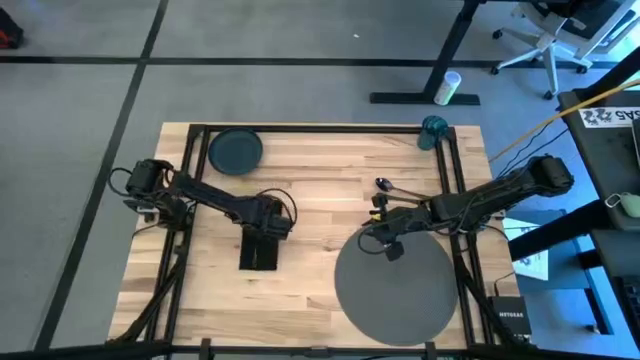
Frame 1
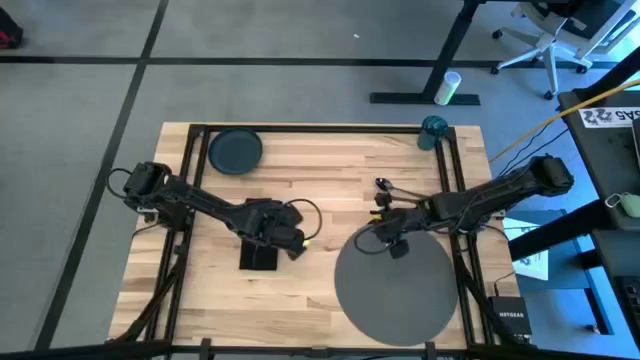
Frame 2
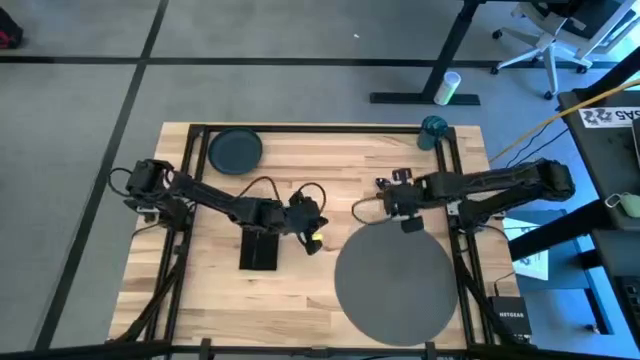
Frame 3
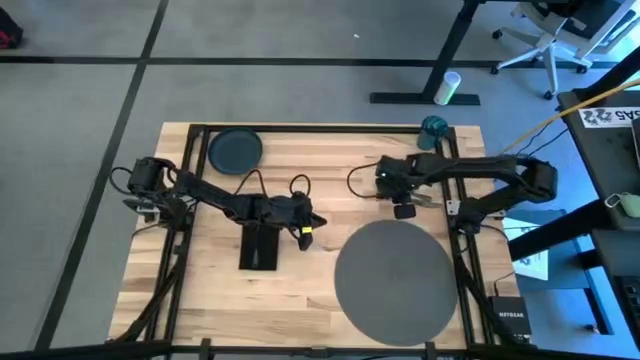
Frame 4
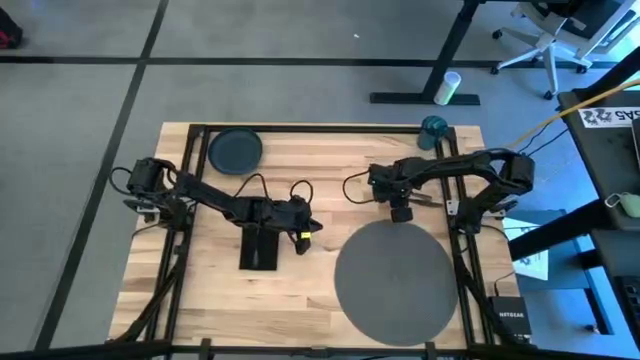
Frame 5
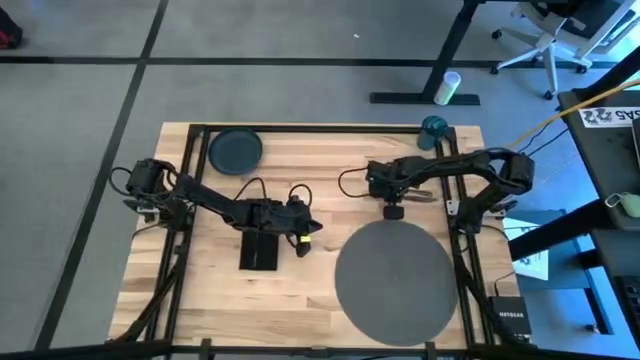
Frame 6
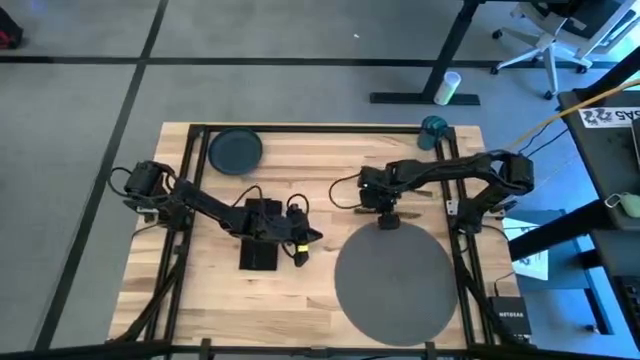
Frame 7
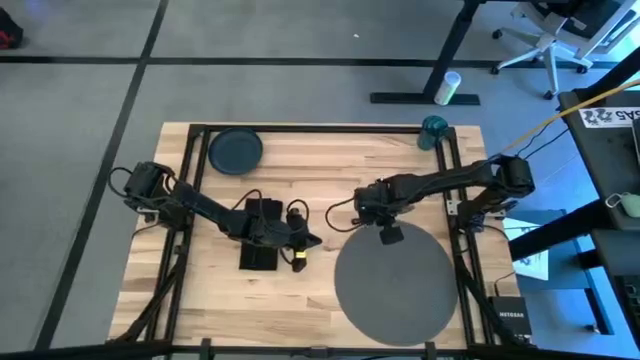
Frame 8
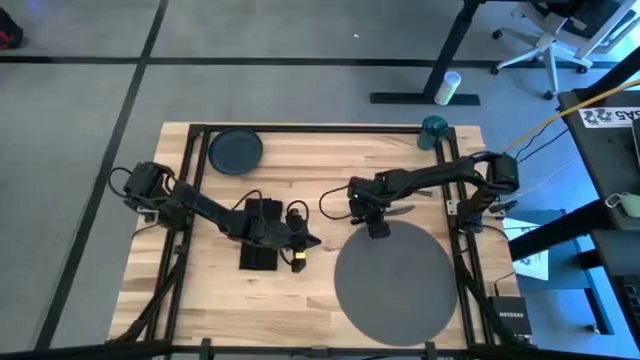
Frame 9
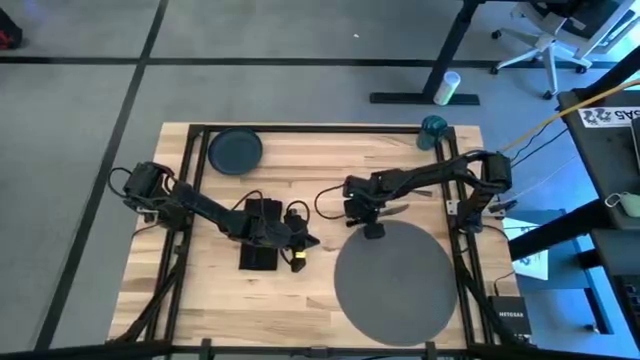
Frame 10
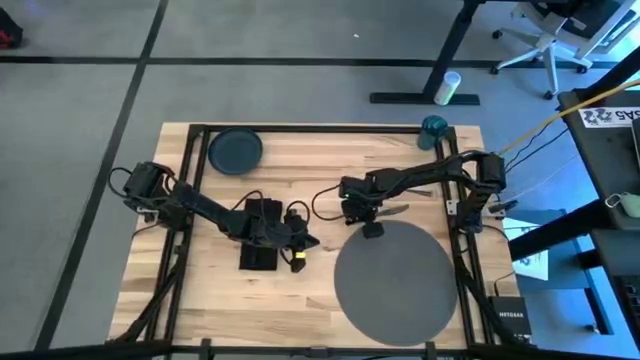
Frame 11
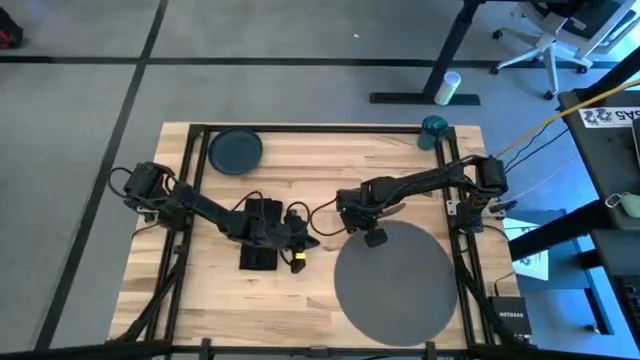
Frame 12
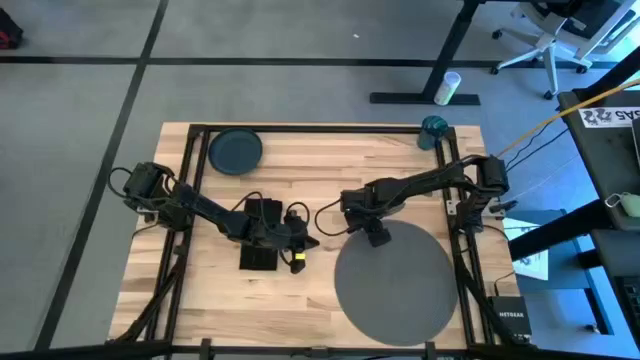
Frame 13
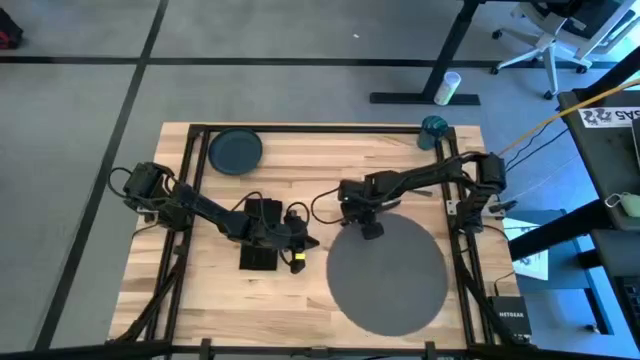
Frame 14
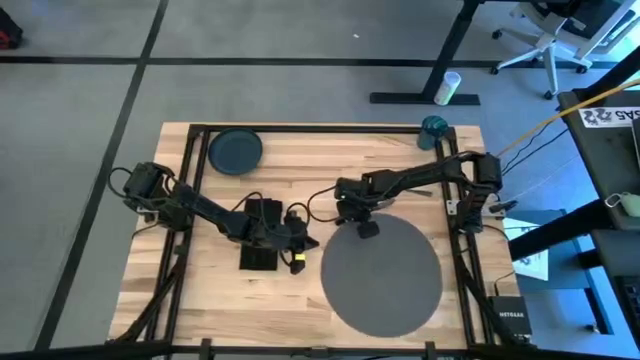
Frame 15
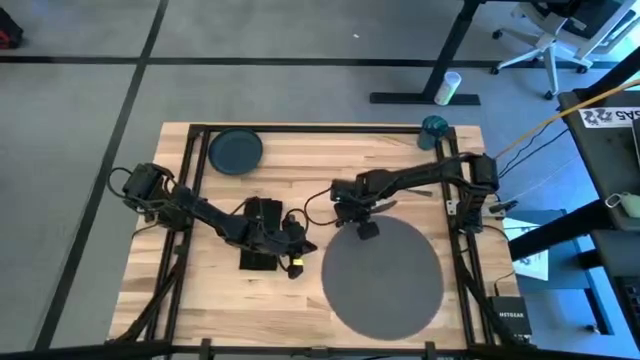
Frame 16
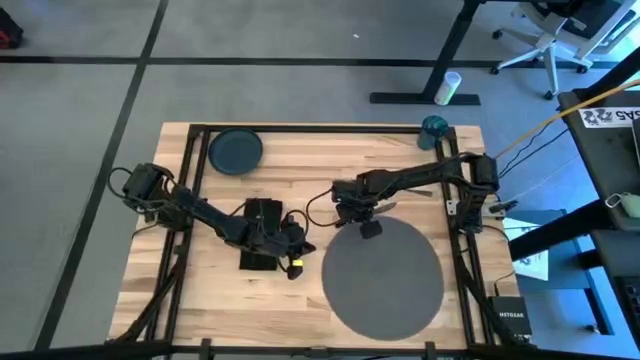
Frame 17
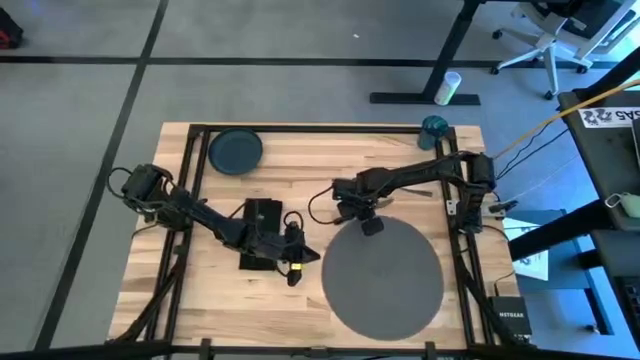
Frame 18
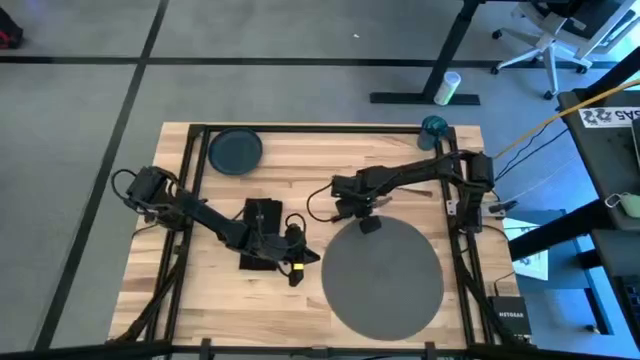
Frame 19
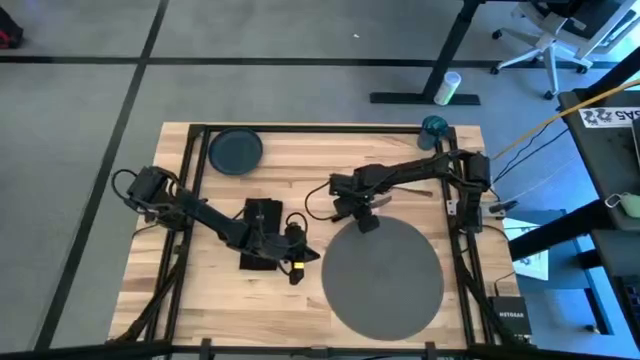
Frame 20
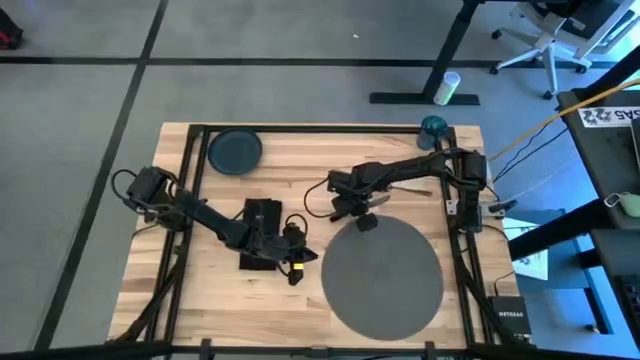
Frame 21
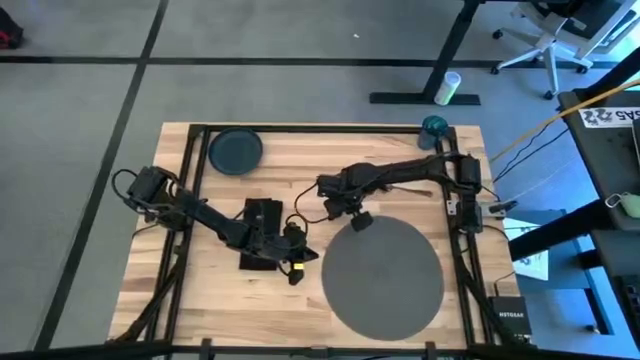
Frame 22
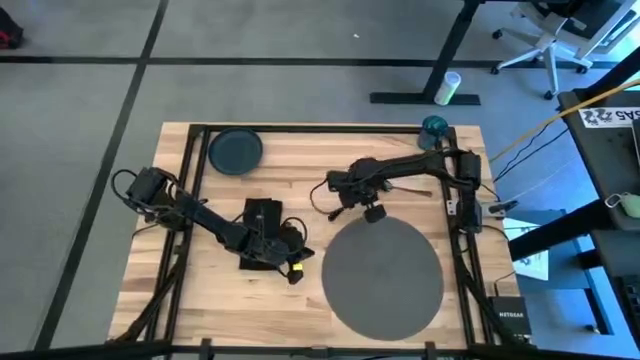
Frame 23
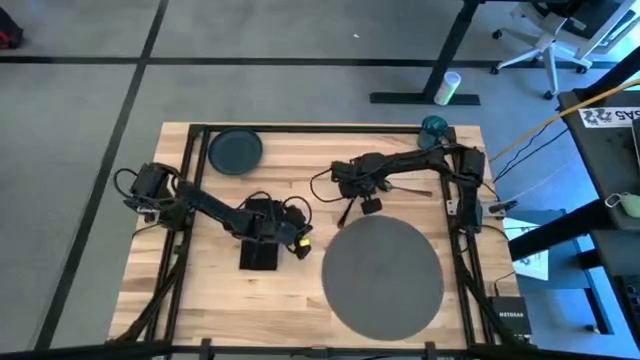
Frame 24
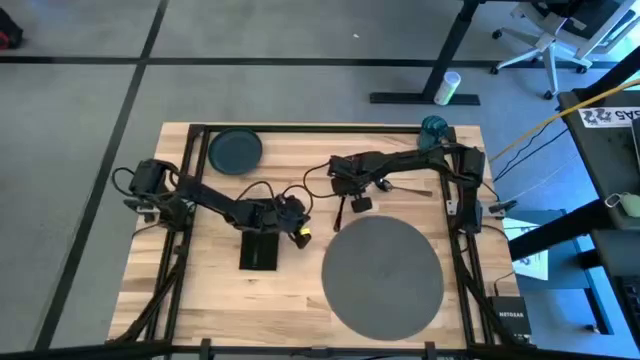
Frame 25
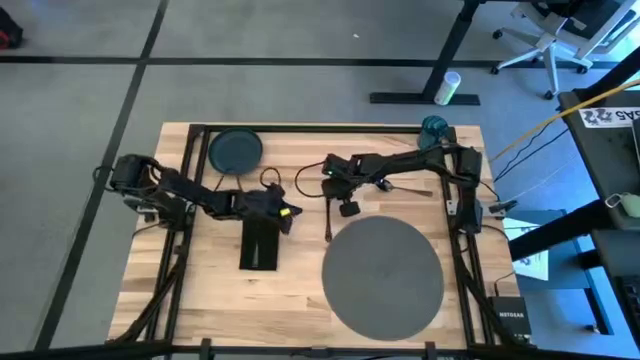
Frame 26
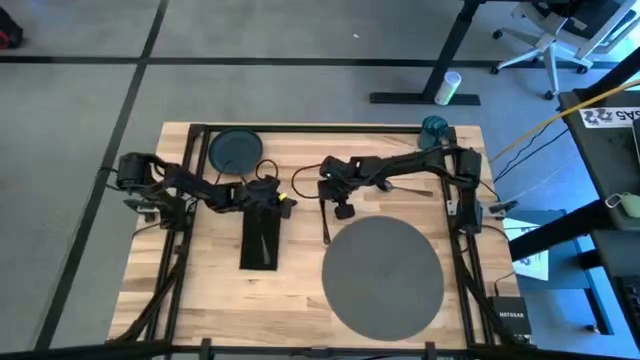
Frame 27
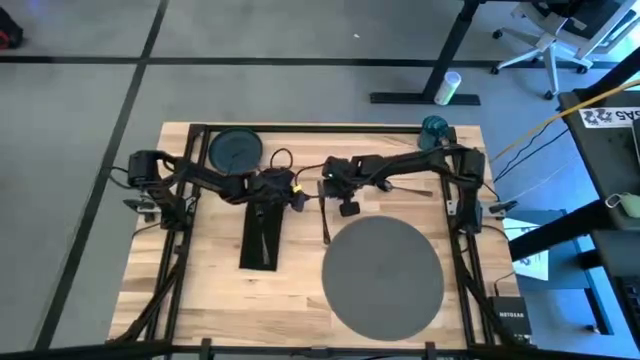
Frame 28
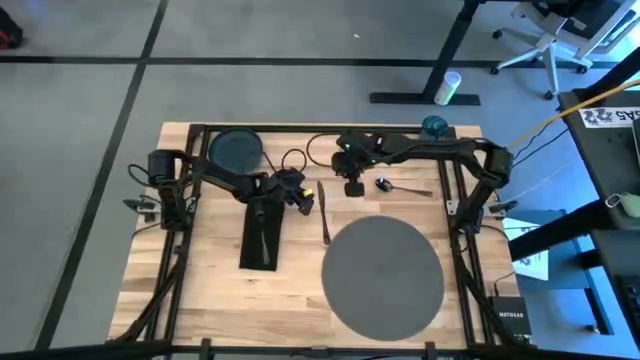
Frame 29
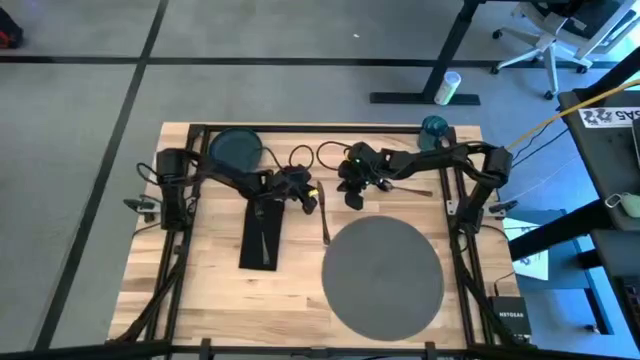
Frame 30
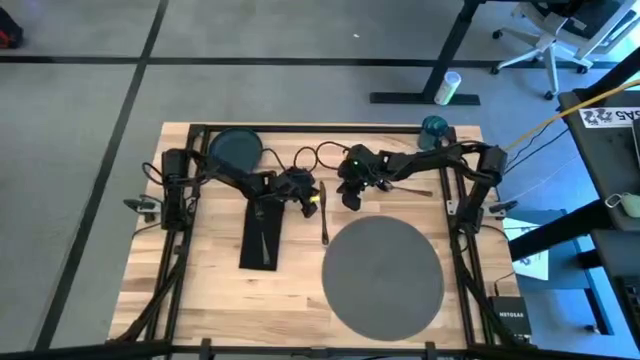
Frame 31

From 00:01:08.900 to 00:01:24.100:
Task: Set table place
Put the black knife on the gray table mat

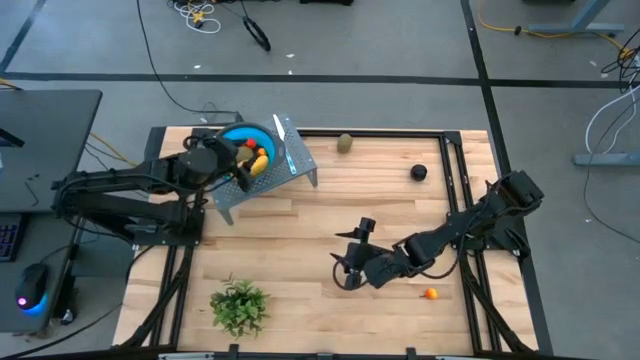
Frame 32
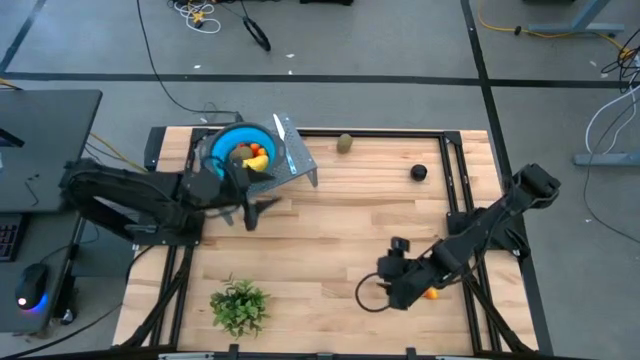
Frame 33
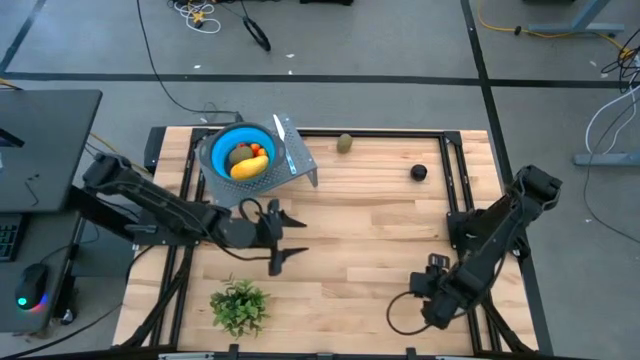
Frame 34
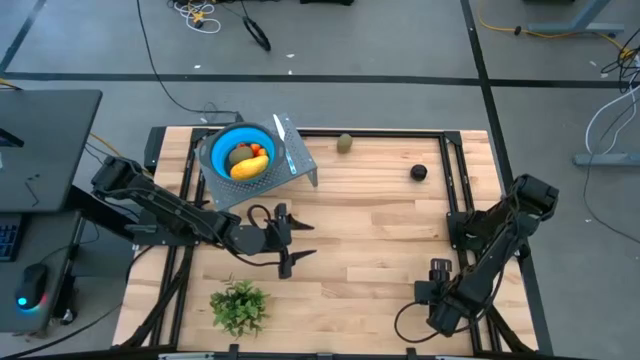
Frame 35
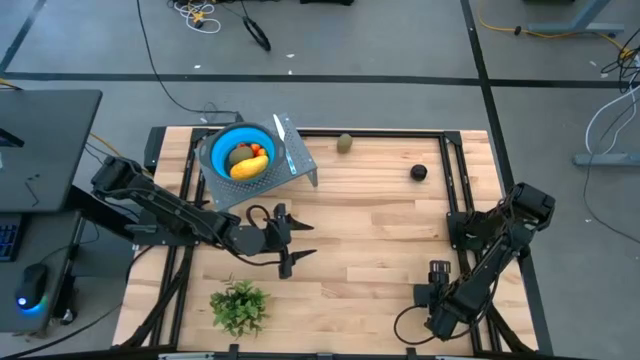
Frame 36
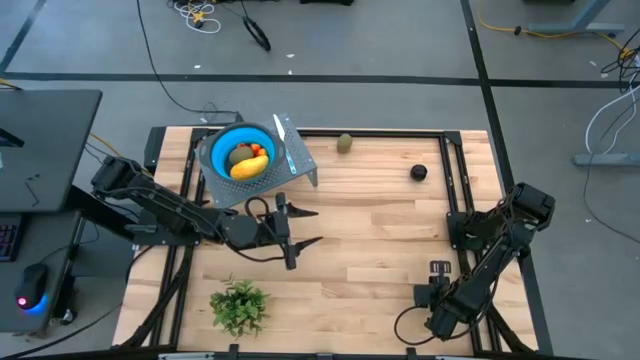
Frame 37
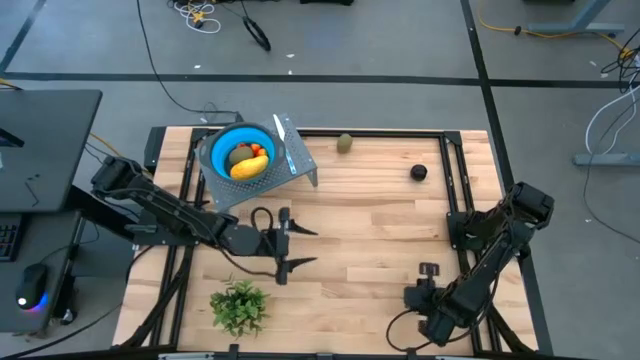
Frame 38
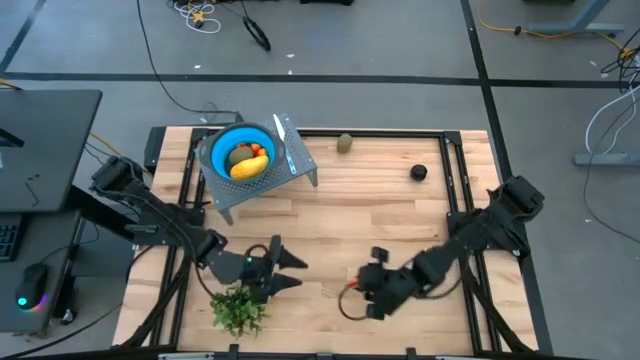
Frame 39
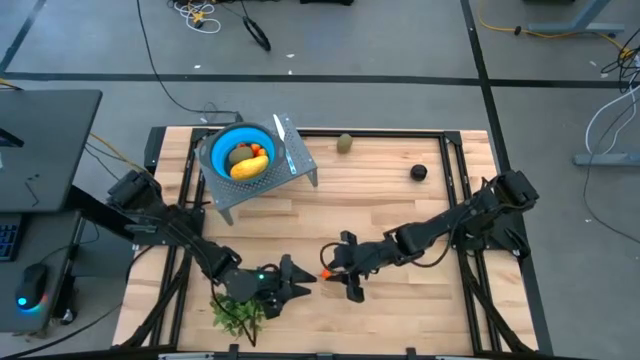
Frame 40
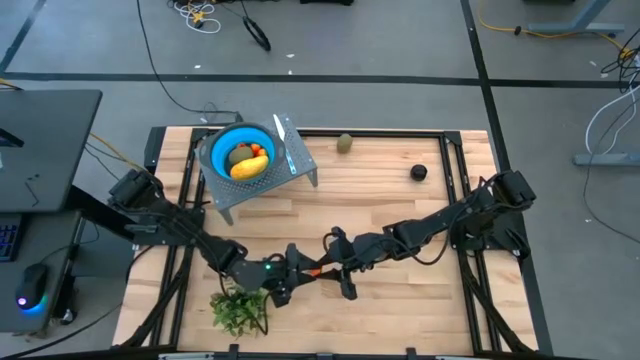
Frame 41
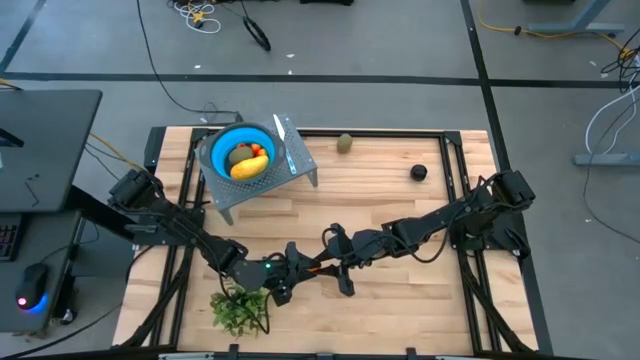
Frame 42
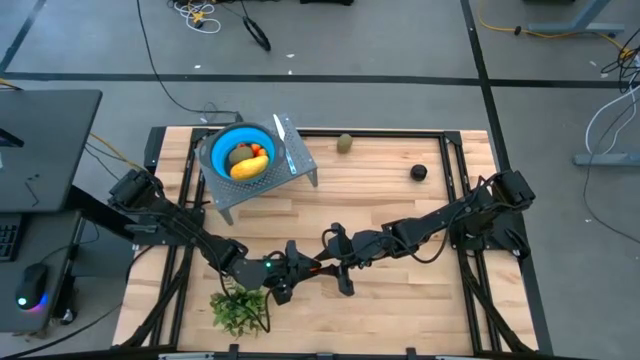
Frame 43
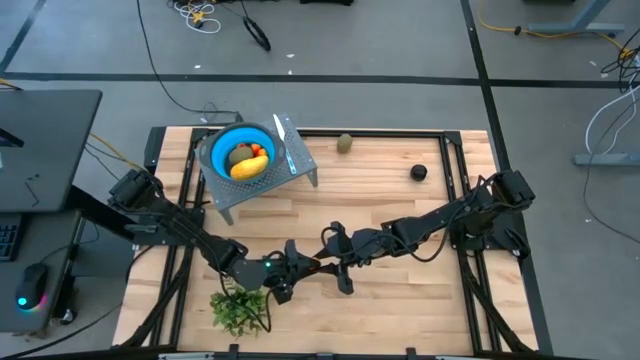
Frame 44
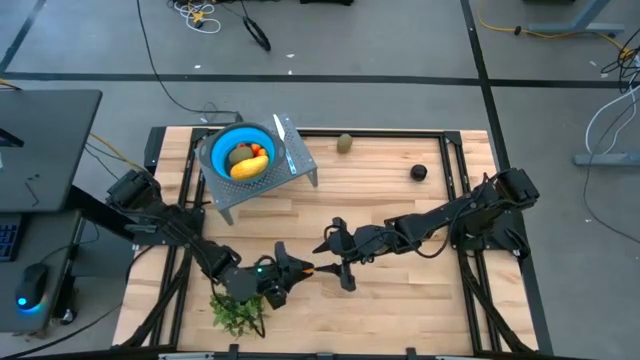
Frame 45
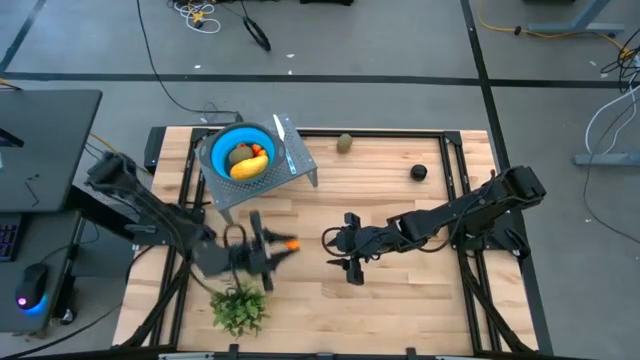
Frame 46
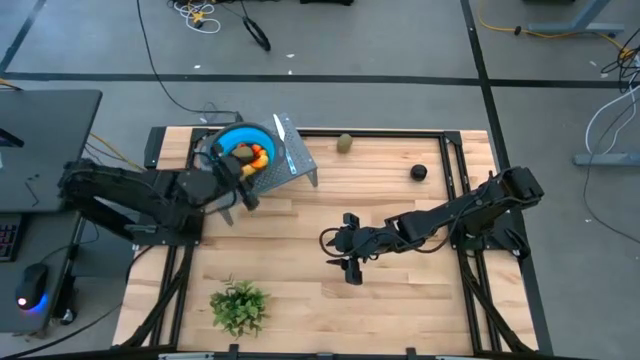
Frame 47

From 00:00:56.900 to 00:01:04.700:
Task: Pick & Place Fruit
Put the orange pear into the blue strainer bowl on the shelf
